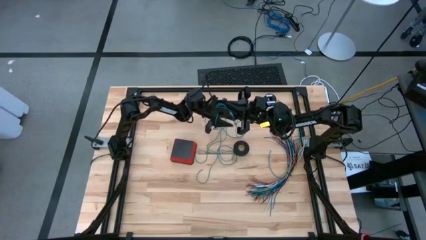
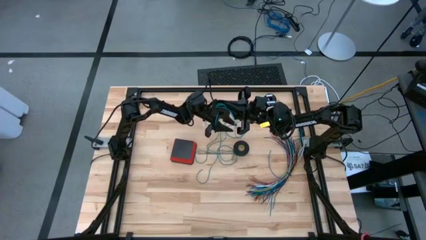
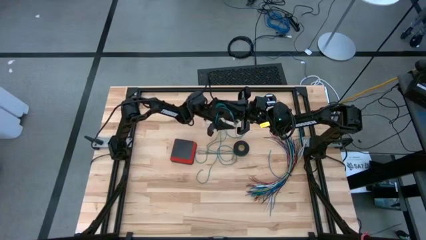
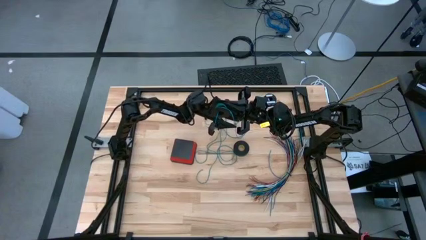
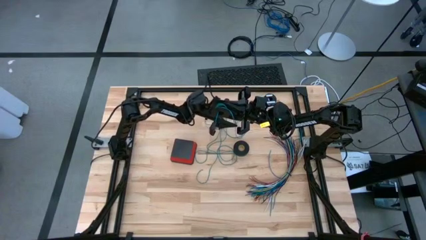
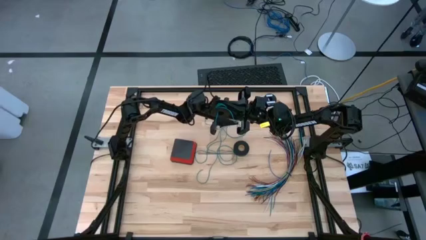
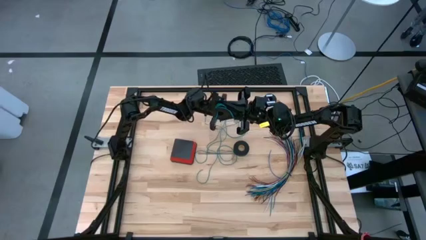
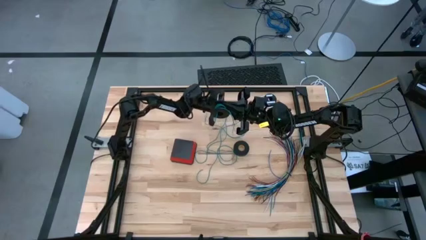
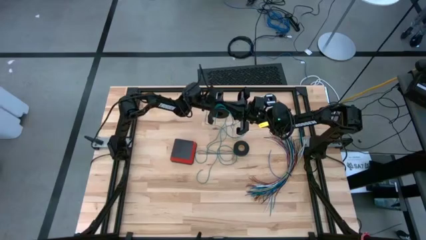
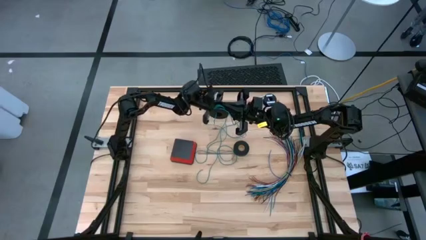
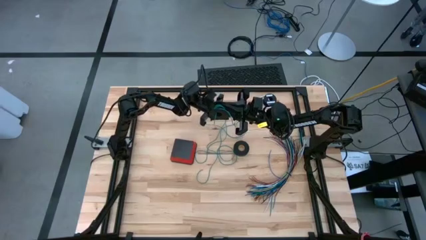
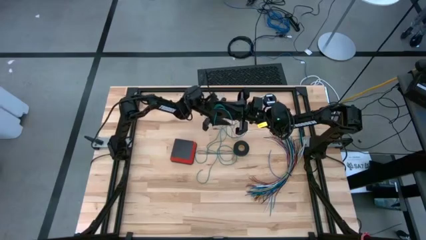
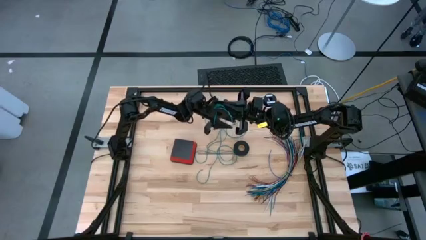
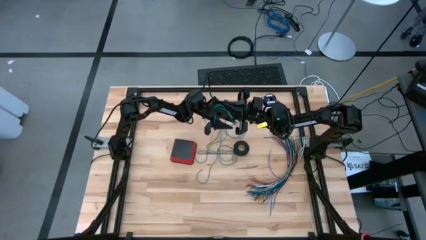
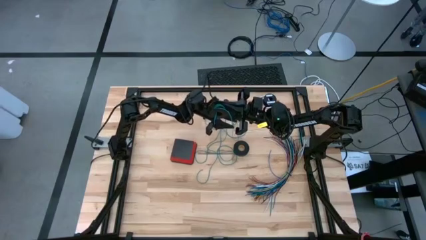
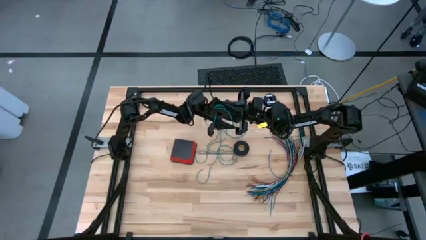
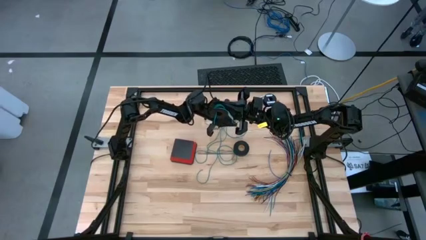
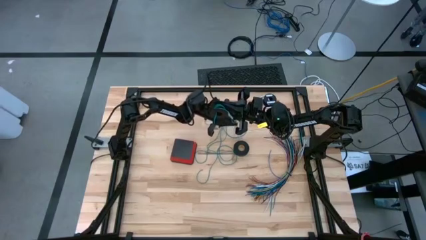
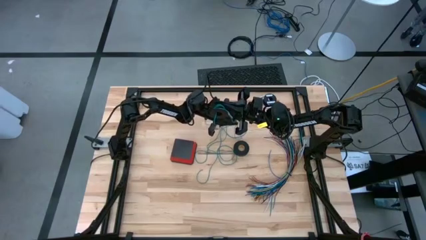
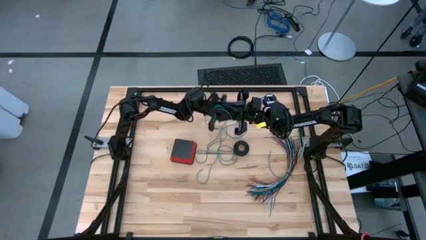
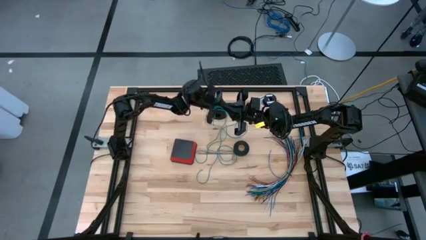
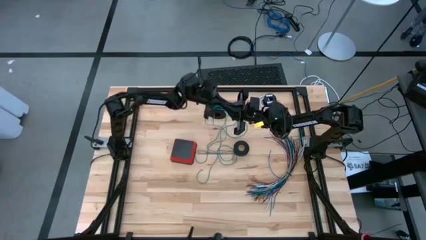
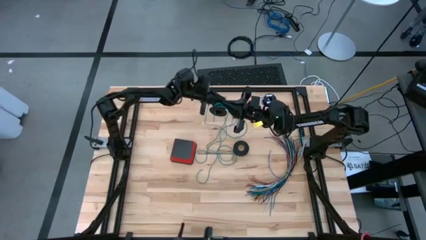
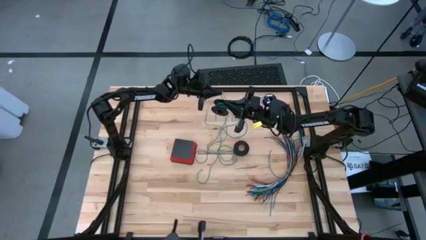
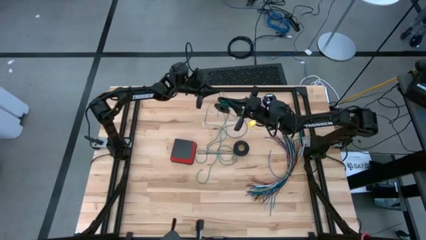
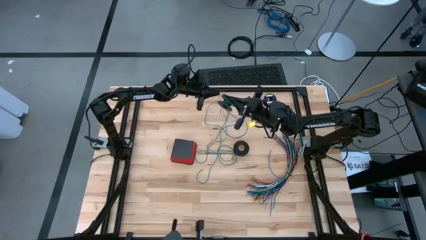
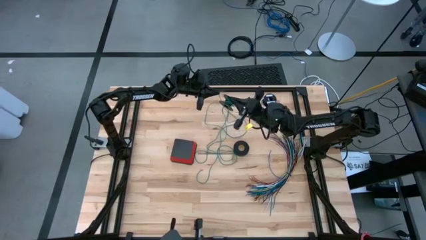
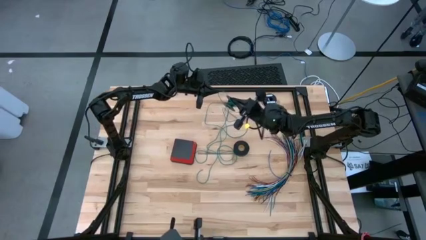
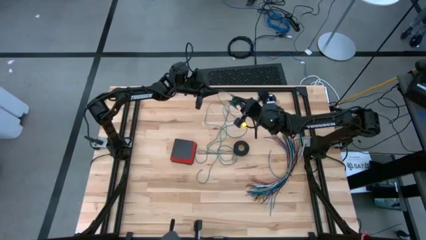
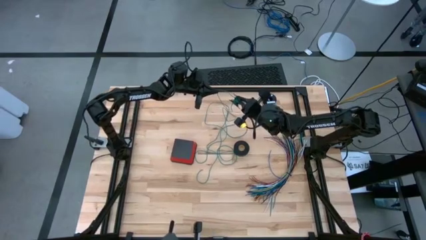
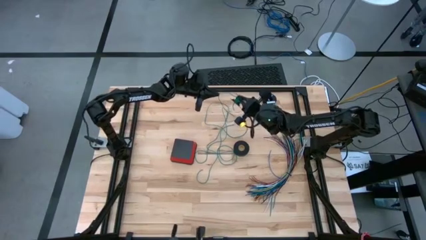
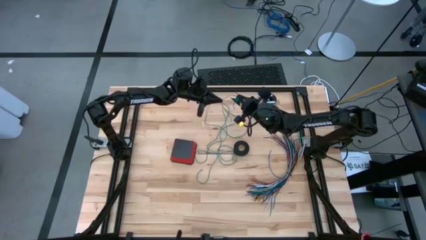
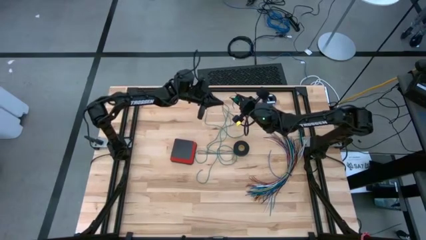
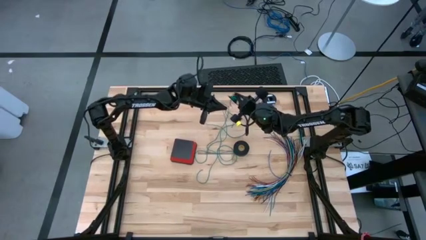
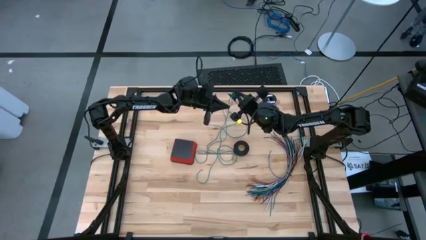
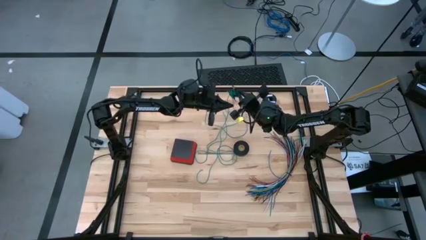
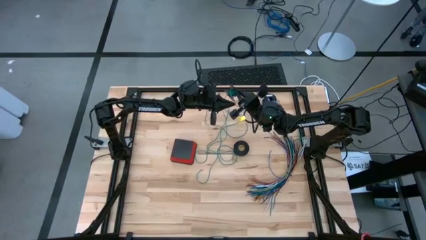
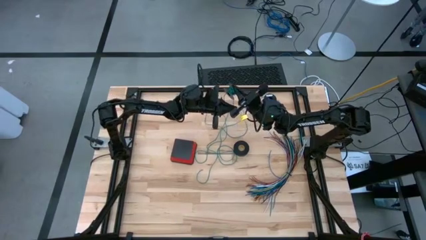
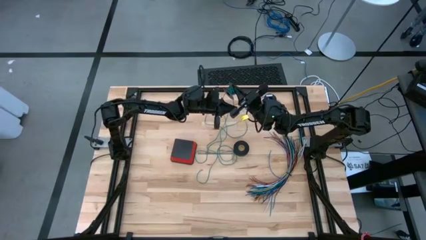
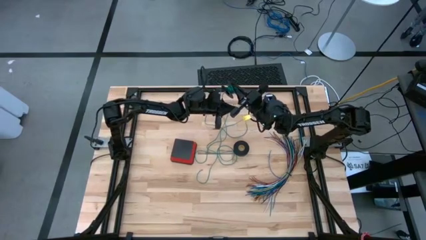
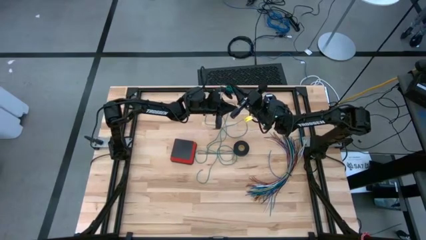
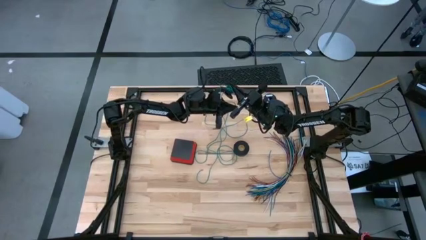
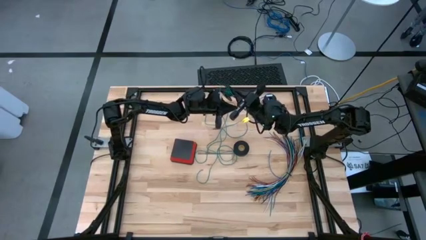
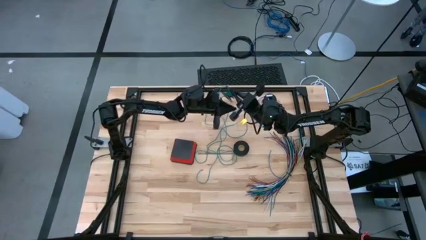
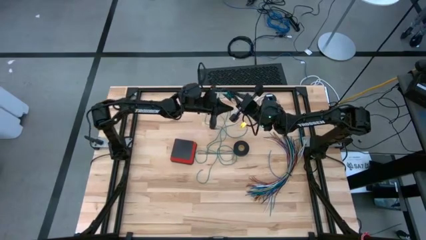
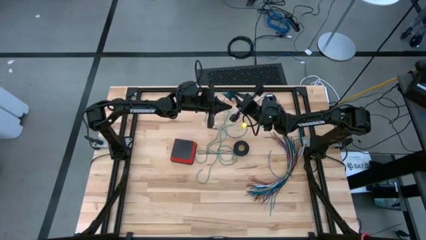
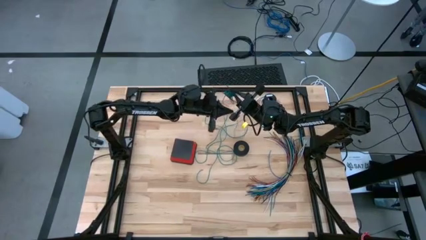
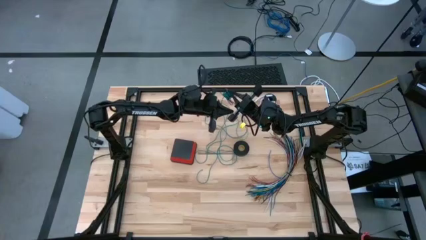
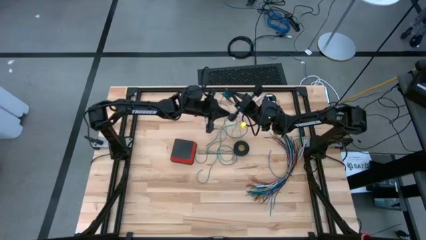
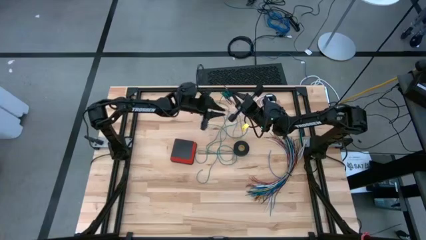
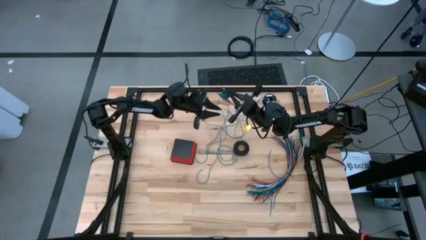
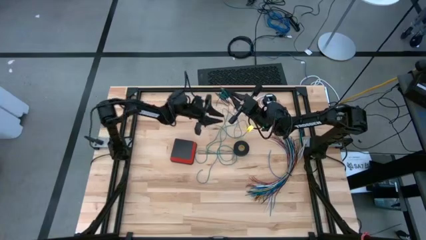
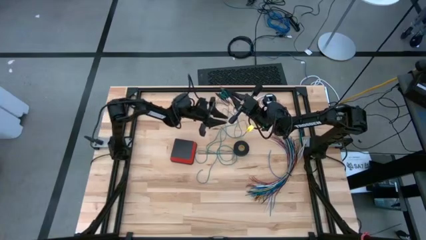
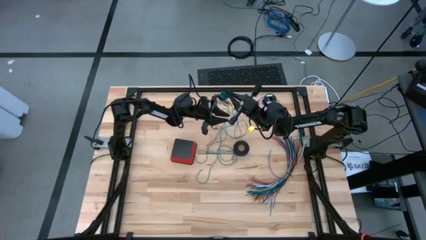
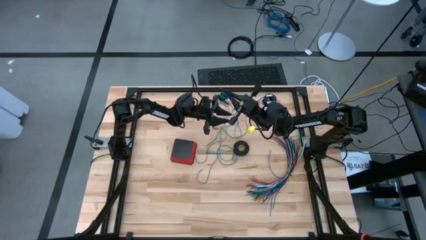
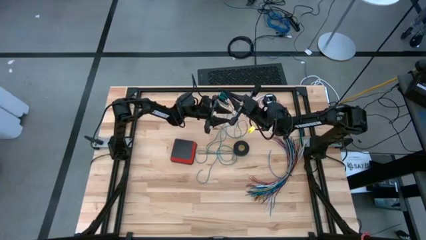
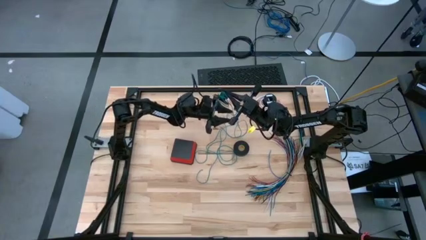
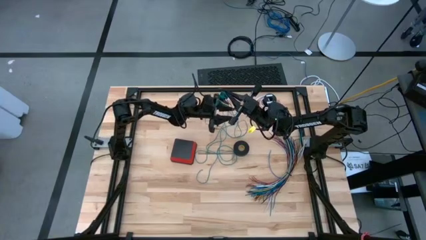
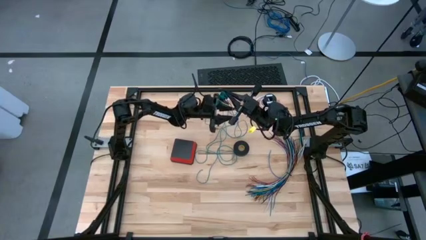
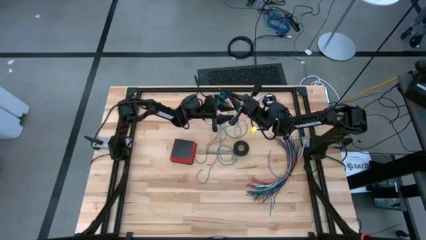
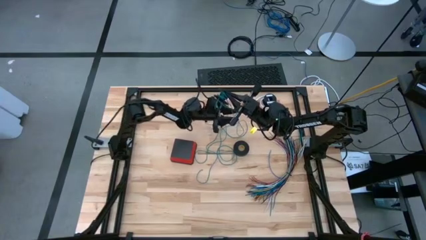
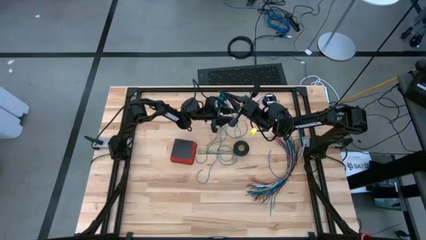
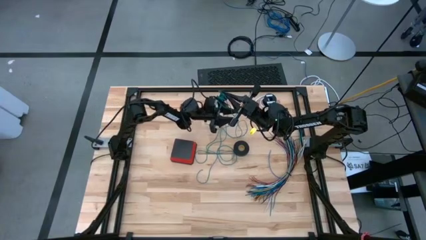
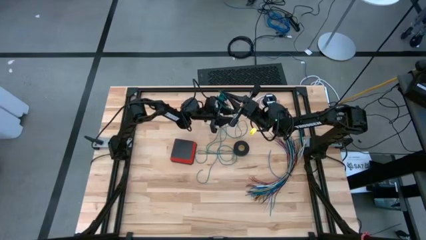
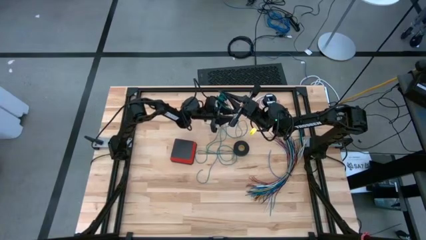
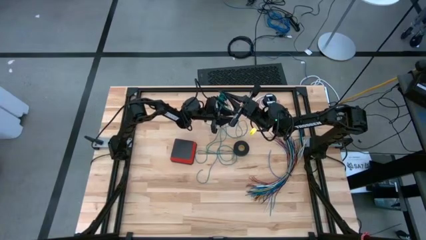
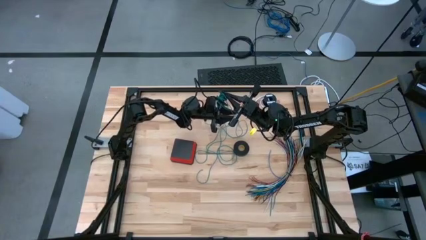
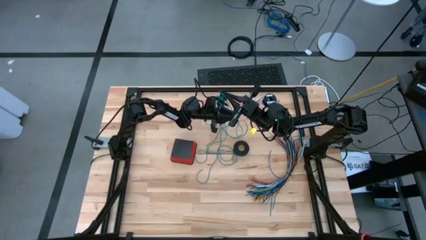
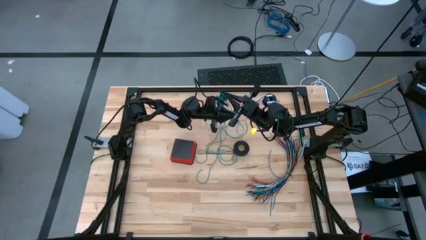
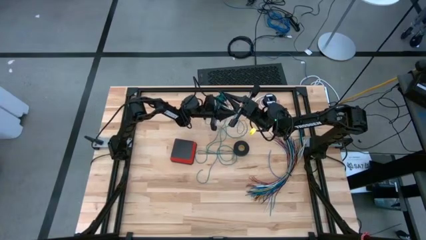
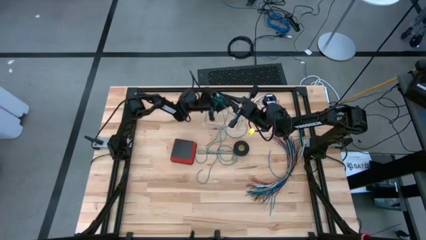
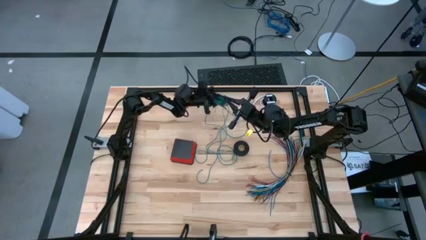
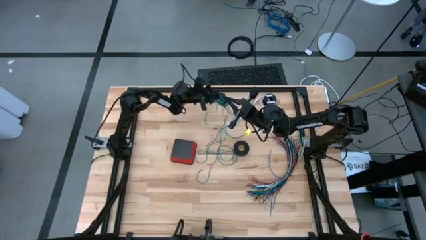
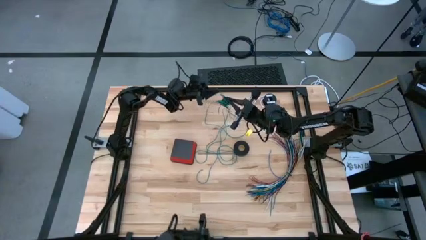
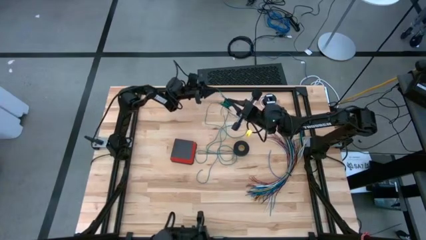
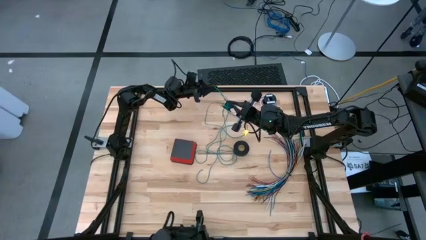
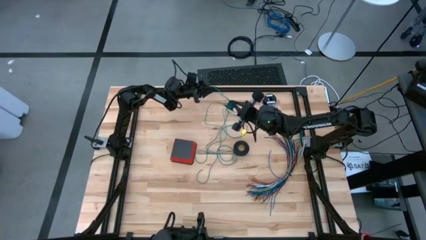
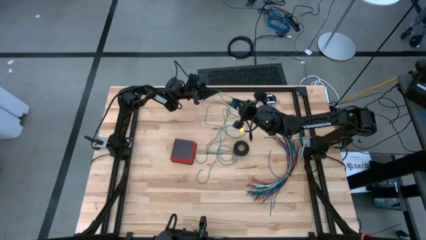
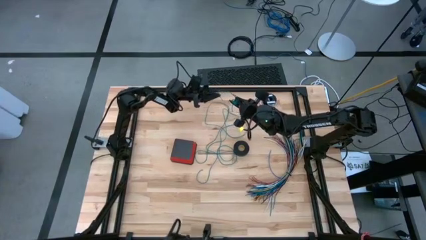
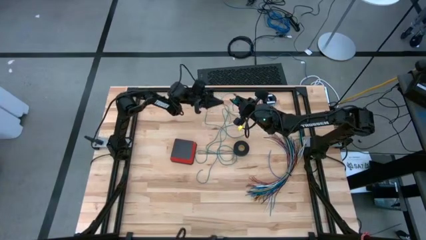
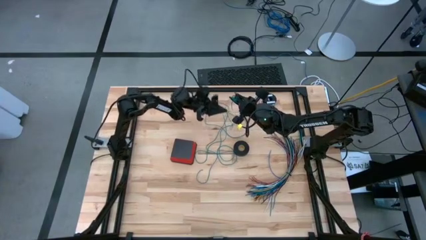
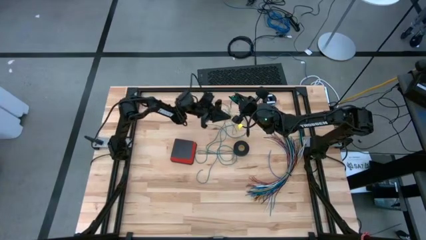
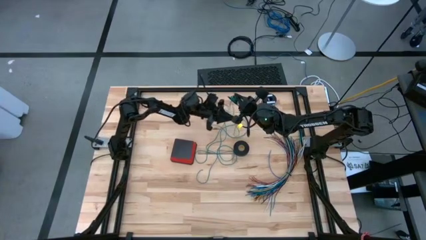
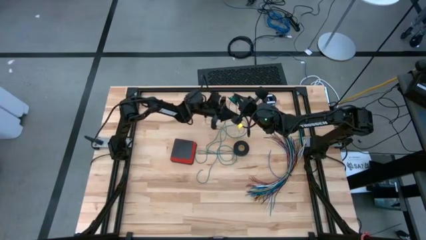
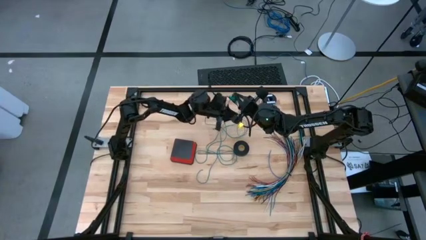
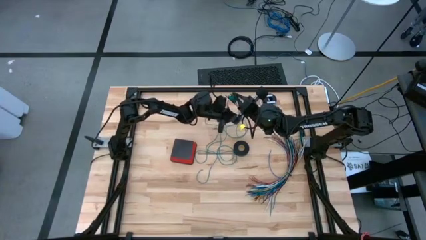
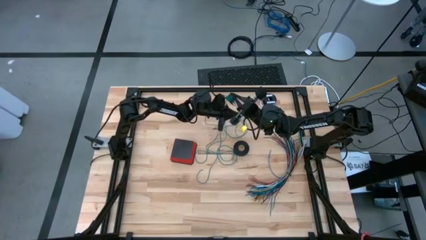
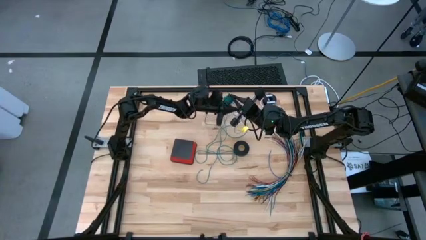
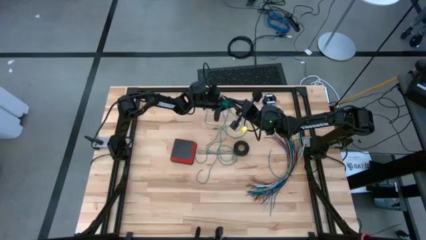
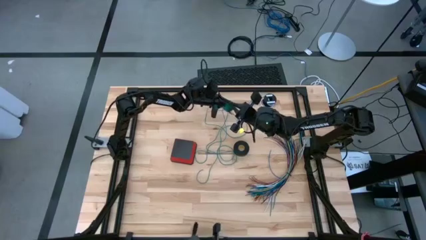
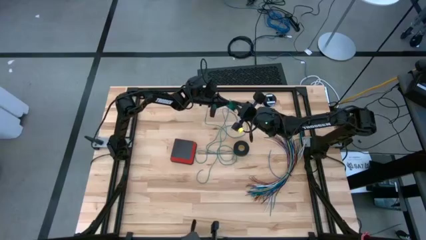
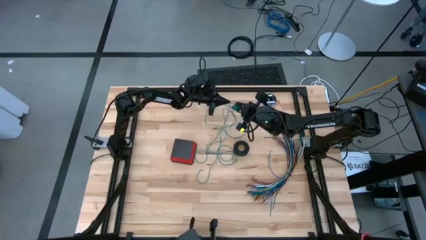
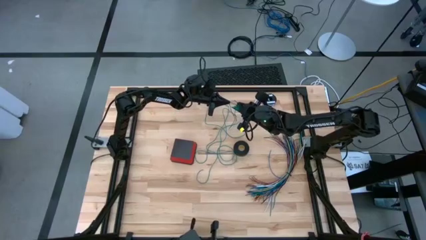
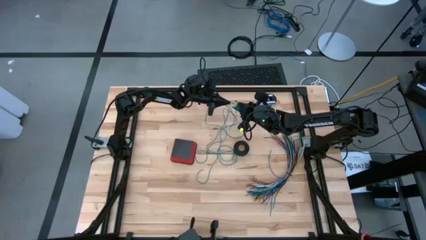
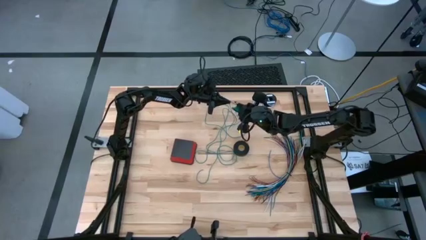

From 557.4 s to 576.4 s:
Task: Coiling cords
Coil the green wire cable on the spool
